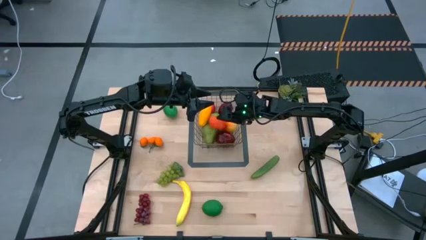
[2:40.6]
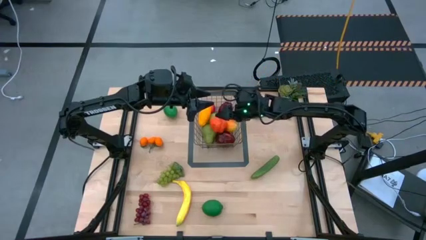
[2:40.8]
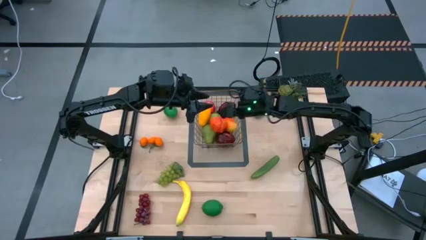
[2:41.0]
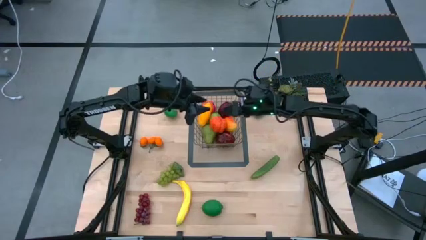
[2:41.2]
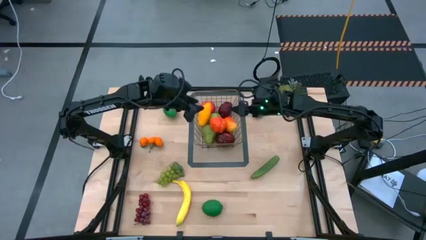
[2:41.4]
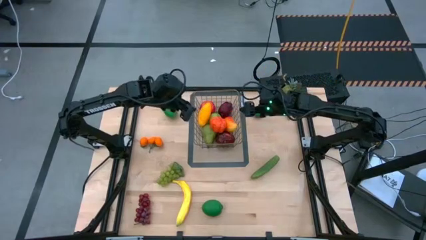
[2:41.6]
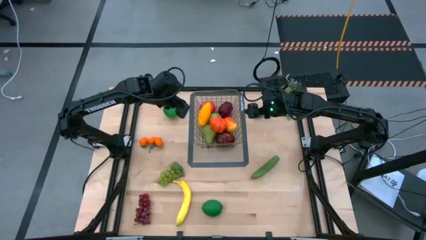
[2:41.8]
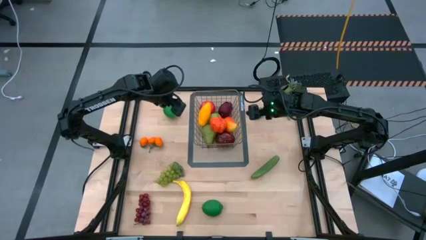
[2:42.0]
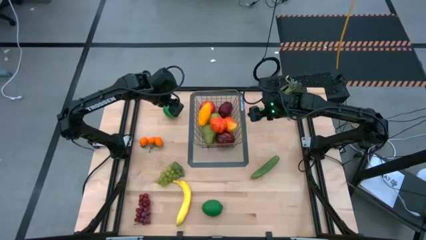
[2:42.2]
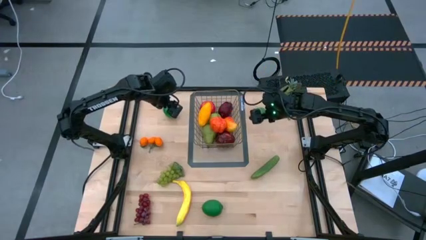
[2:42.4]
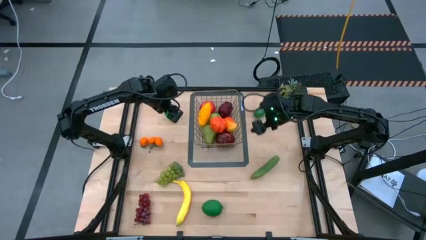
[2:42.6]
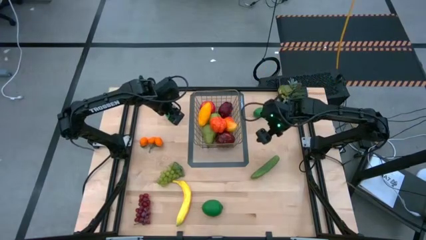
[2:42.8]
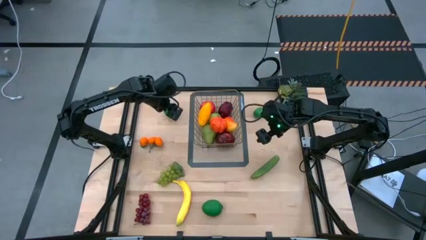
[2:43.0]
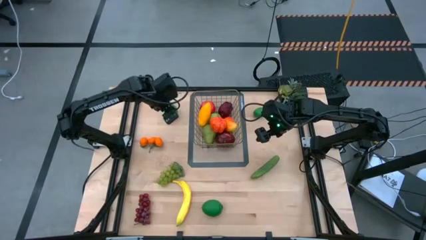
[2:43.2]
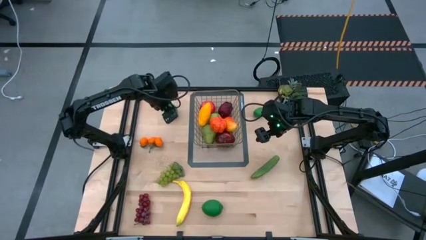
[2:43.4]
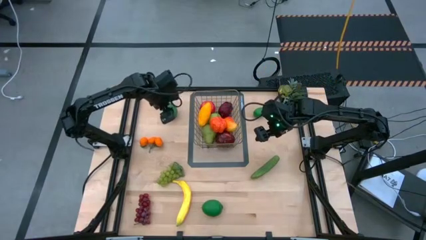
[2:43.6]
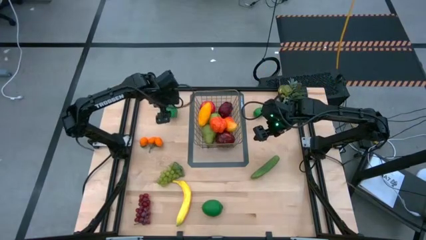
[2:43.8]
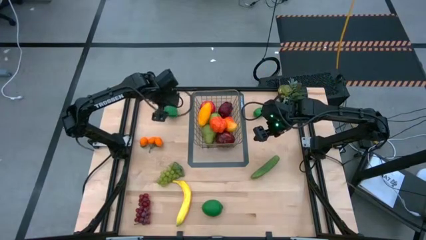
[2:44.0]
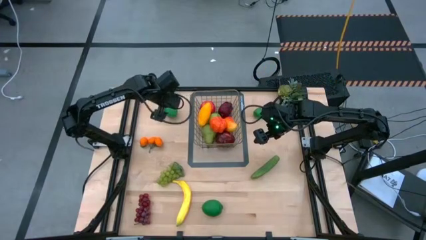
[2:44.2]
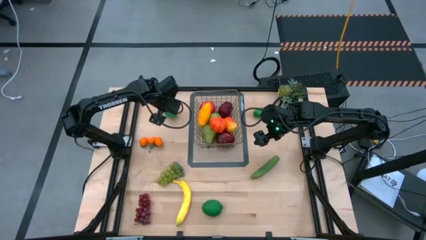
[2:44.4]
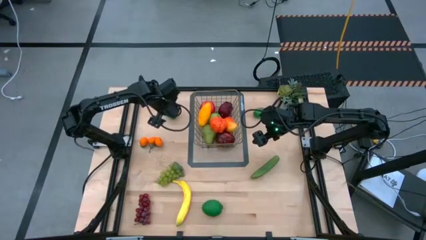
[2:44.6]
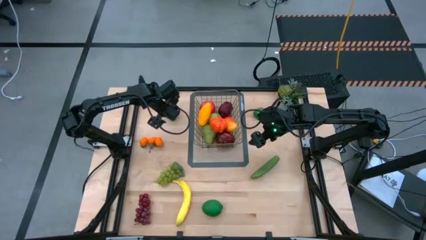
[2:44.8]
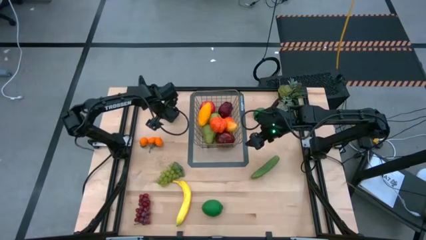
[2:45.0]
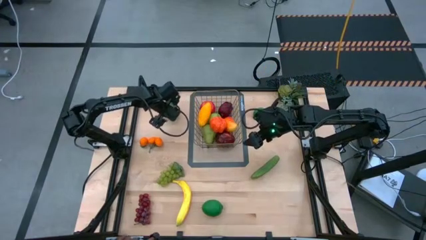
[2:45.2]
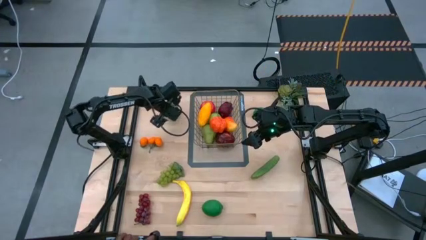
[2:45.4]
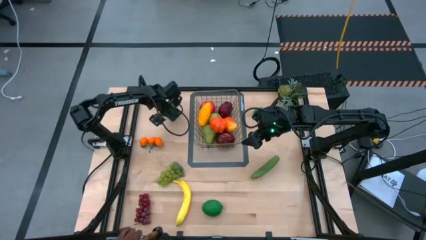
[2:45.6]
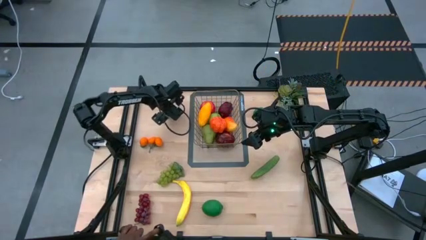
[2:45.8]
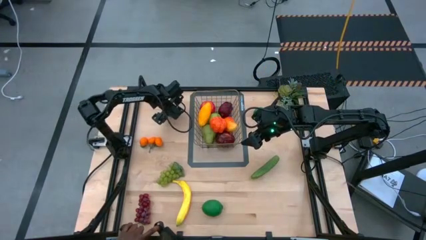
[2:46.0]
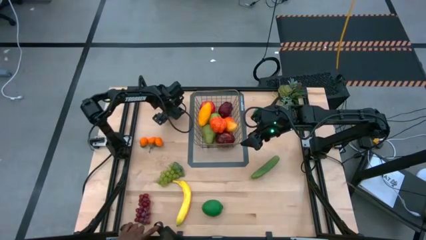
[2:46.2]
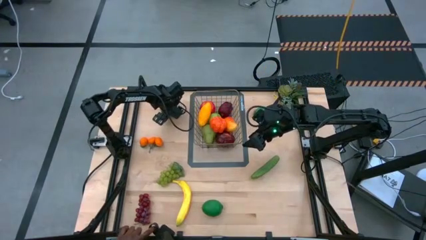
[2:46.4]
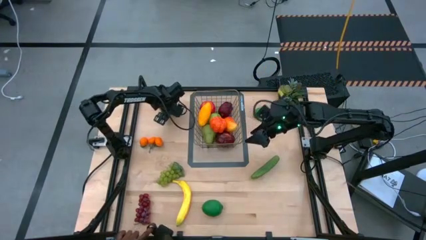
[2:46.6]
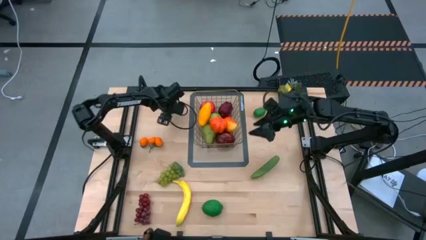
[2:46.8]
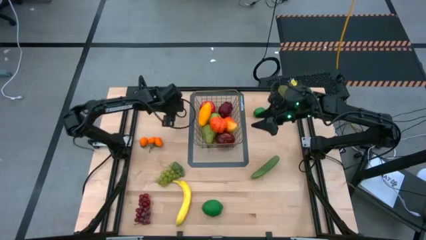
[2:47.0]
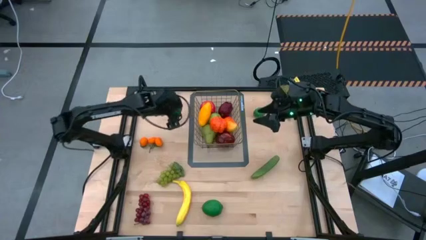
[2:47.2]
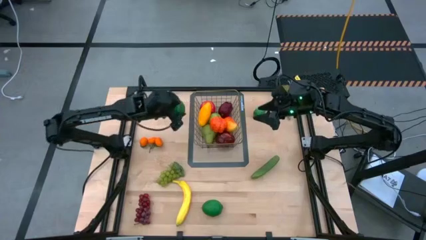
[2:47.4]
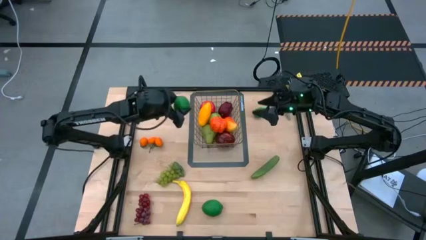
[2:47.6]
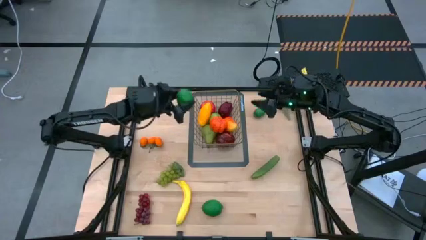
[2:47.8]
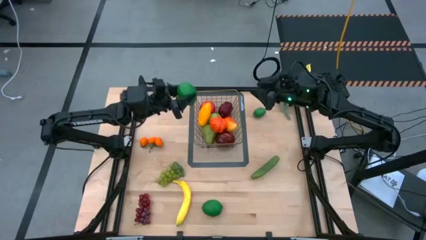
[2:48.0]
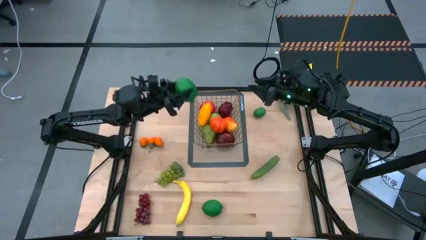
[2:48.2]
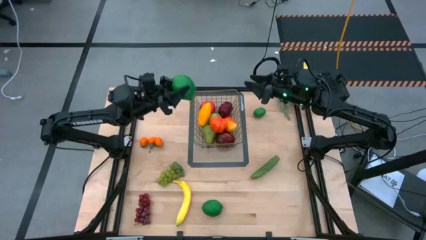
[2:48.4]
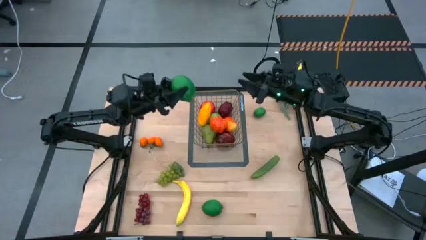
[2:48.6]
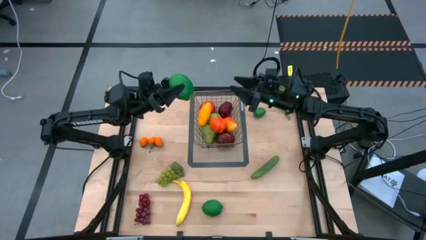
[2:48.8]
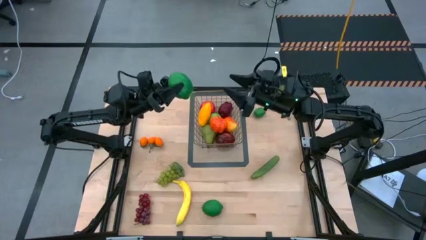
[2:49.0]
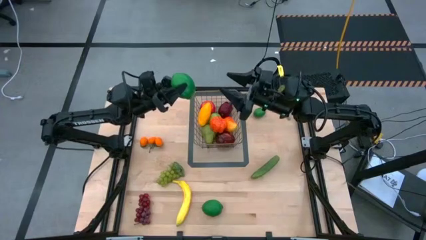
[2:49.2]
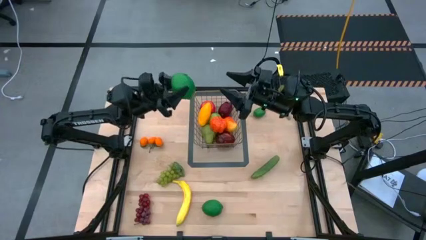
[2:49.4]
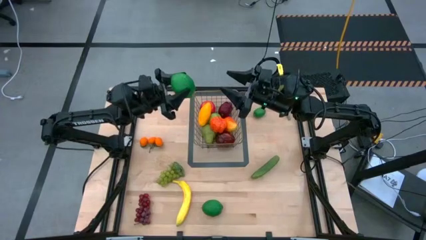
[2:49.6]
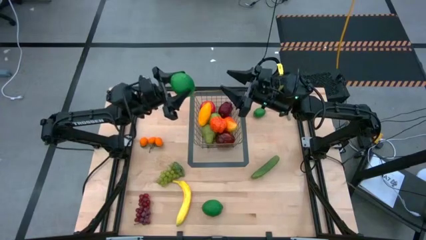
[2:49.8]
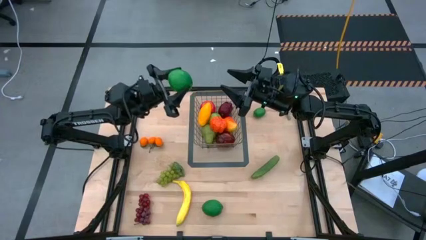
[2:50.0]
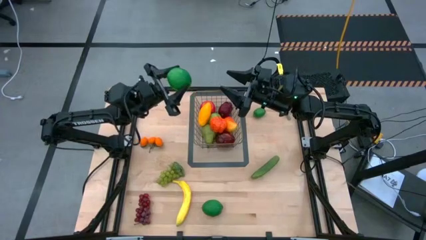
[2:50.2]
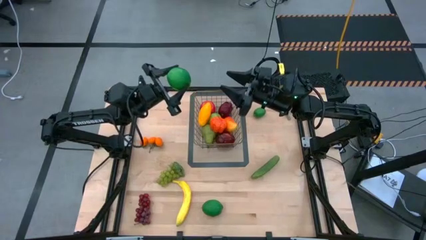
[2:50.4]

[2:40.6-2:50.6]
Task: Build produce basket
Put the top left green lime into the gold wire basket

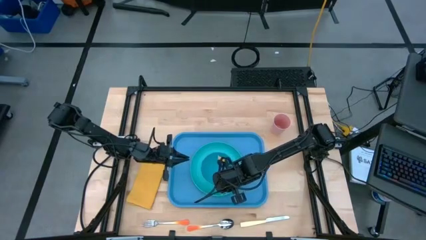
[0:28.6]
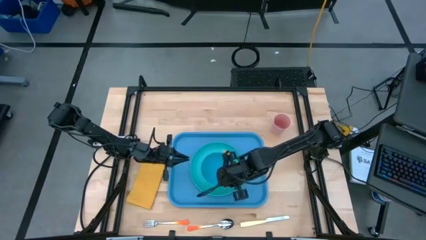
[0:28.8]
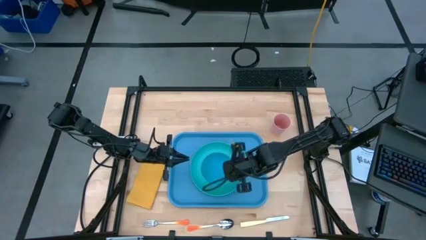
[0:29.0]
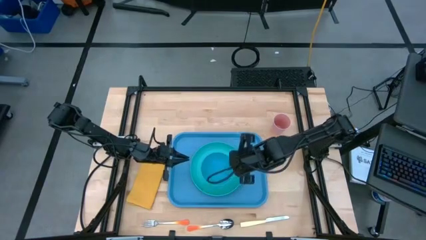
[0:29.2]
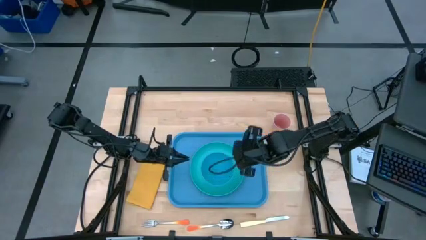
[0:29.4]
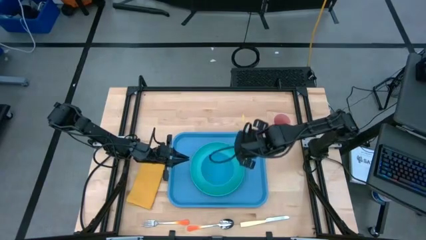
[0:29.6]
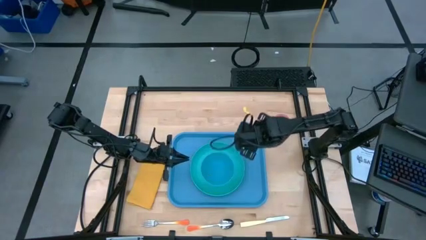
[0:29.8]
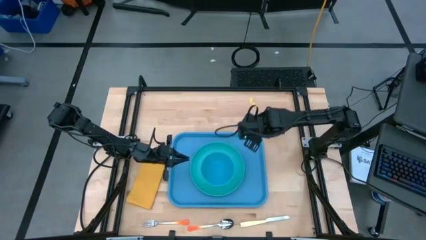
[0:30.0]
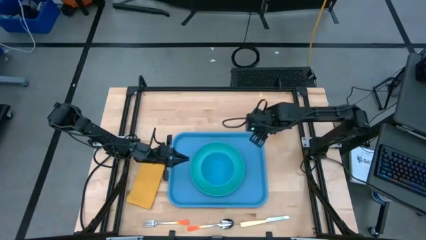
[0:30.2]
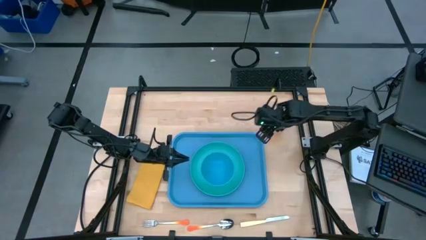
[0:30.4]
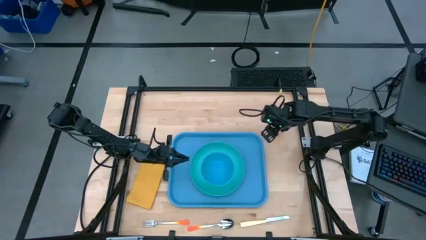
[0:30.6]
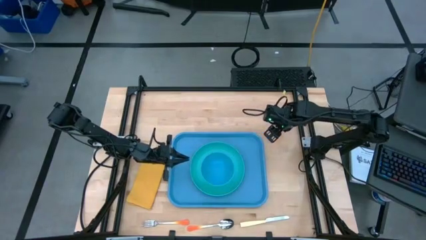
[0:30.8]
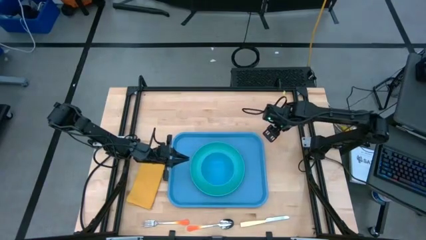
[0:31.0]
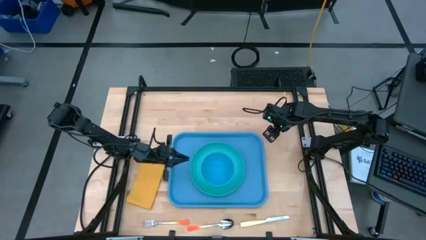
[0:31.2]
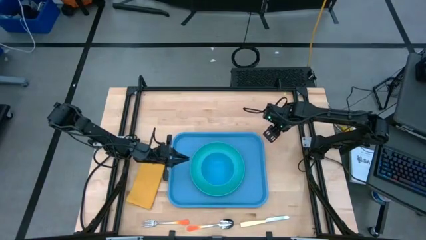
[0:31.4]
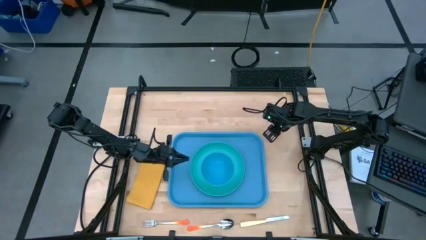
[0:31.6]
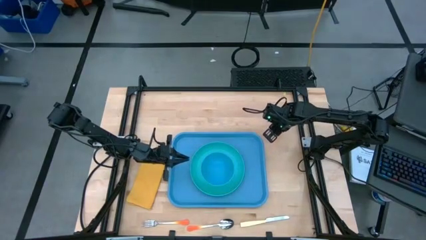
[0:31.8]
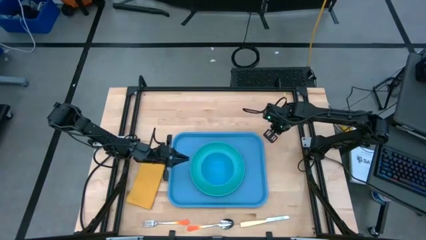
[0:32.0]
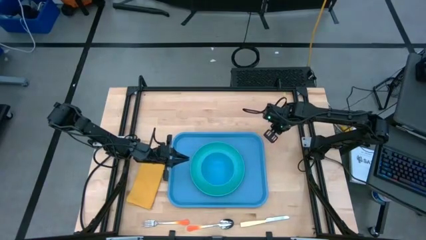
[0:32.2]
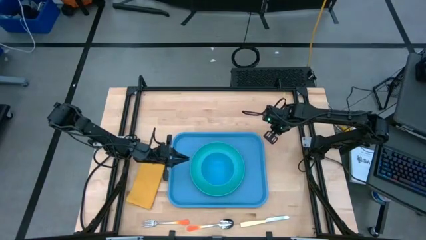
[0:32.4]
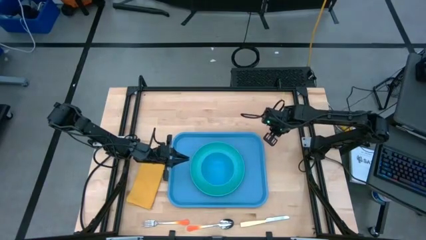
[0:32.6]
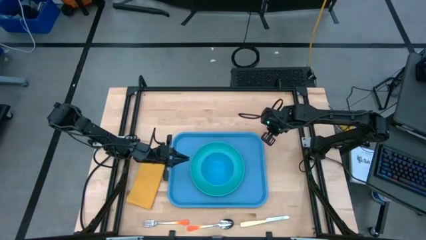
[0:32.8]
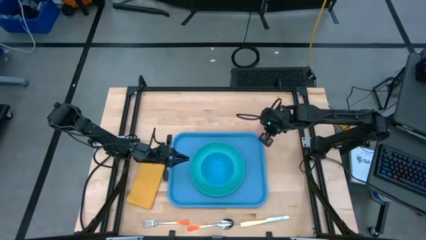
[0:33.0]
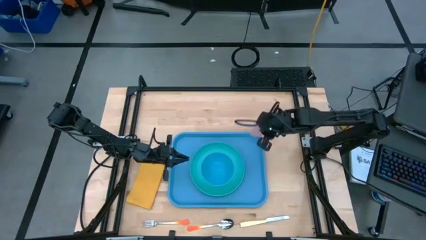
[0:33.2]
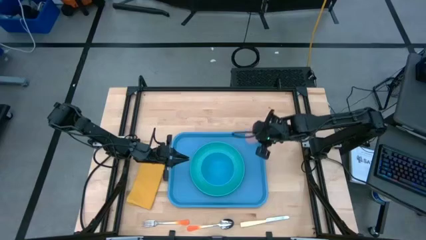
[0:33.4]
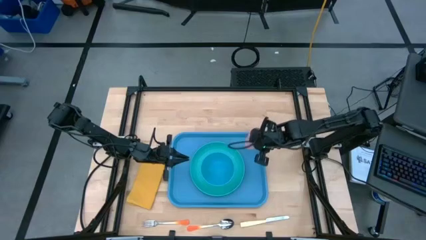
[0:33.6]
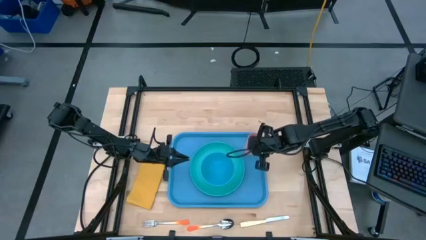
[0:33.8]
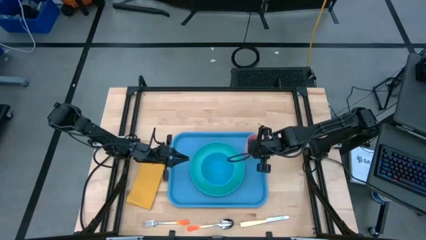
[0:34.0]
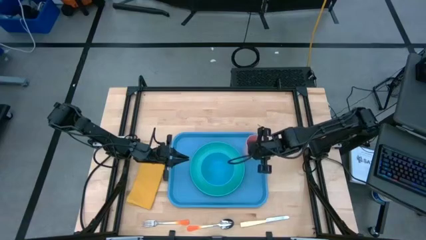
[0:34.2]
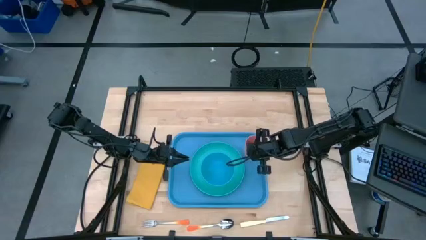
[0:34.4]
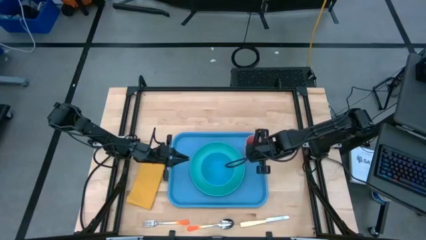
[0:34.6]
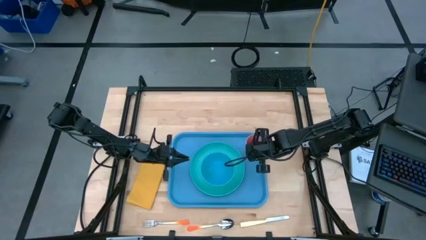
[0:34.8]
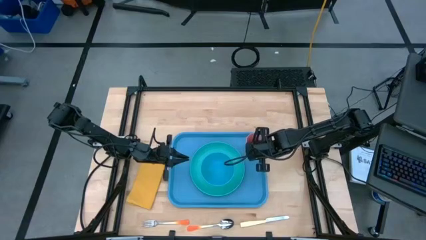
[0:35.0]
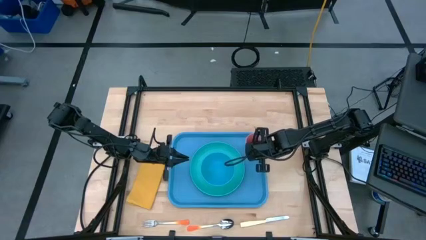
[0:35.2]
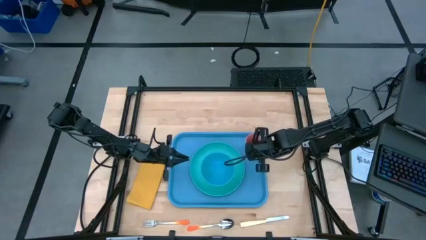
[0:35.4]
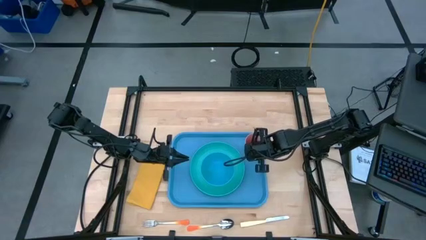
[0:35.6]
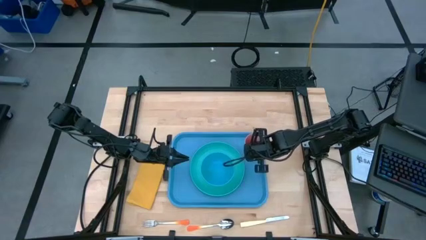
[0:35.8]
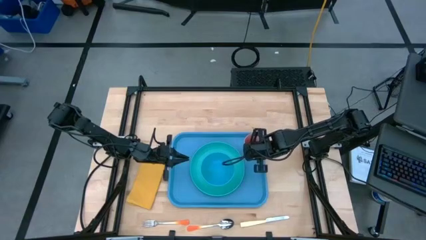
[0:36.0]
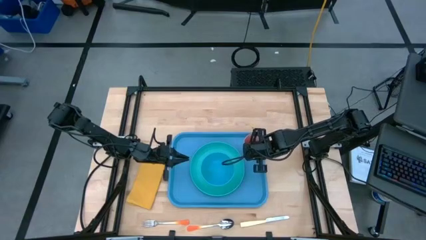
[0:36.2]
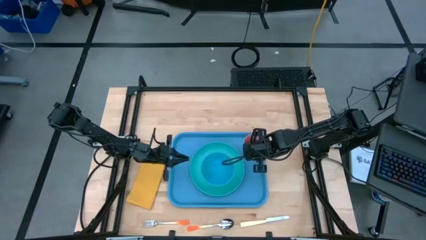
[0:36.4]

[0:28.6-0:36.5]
Task: Set up tray
Put the pink cup on the top right of the blue tray
